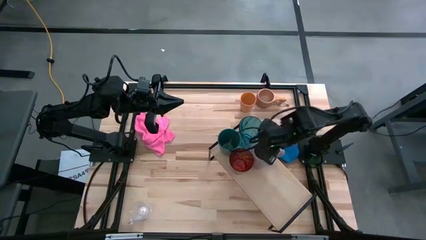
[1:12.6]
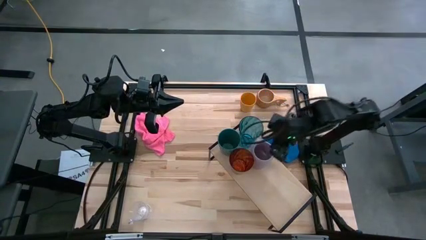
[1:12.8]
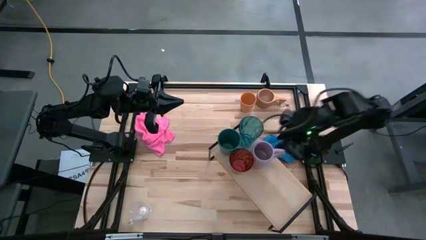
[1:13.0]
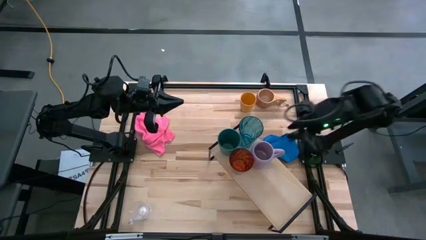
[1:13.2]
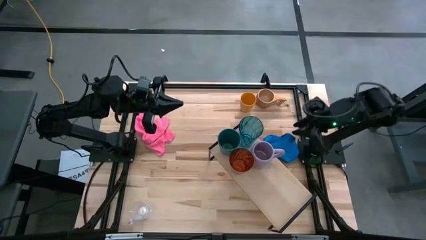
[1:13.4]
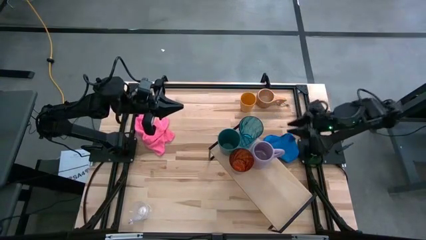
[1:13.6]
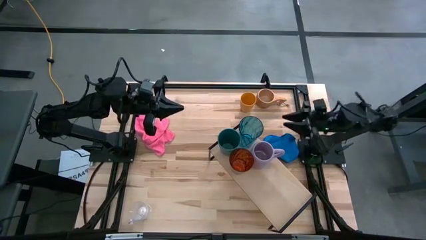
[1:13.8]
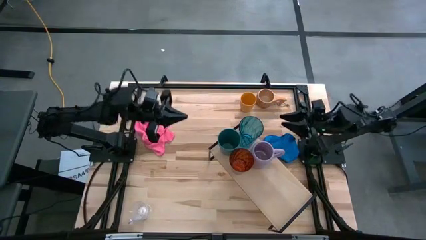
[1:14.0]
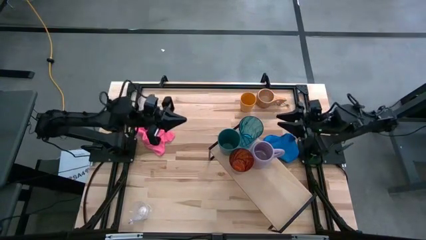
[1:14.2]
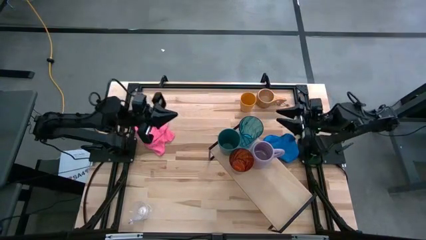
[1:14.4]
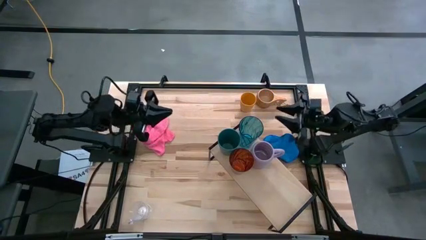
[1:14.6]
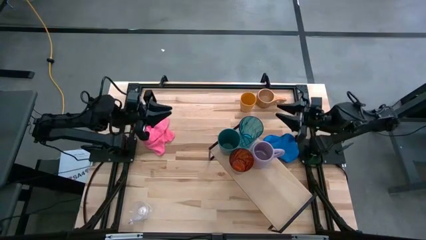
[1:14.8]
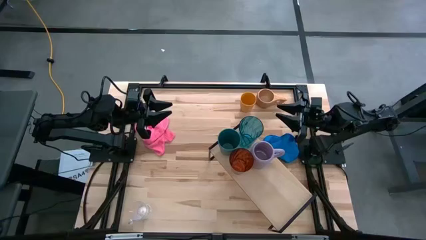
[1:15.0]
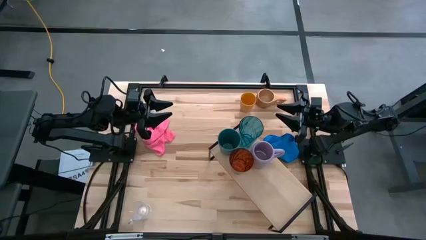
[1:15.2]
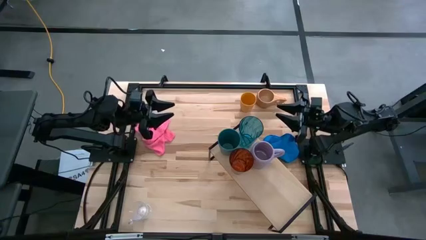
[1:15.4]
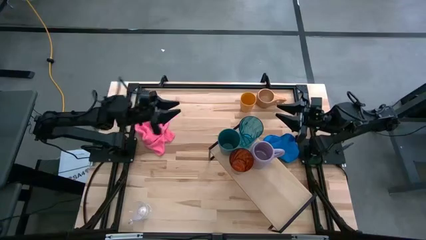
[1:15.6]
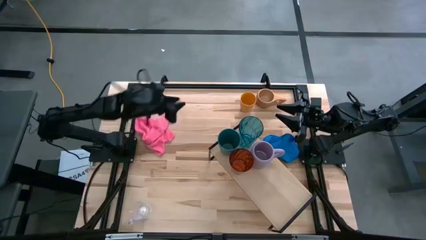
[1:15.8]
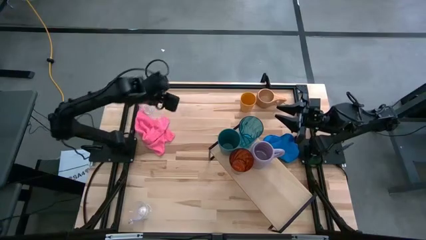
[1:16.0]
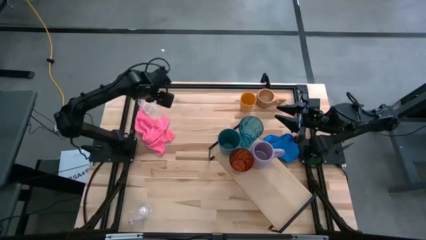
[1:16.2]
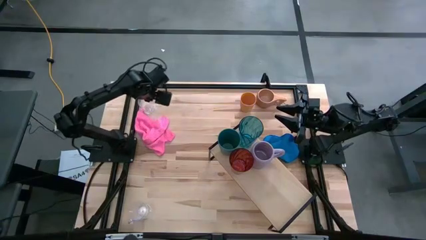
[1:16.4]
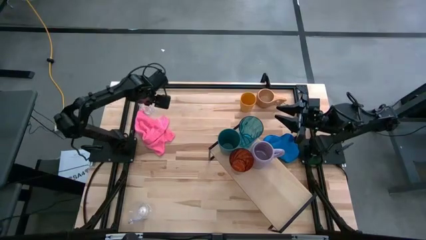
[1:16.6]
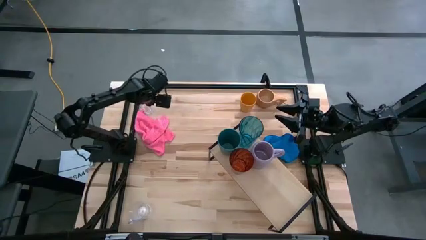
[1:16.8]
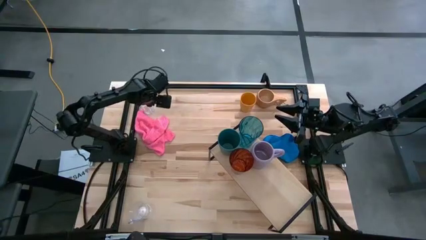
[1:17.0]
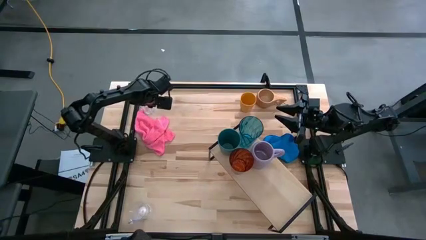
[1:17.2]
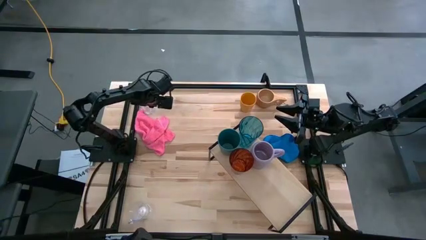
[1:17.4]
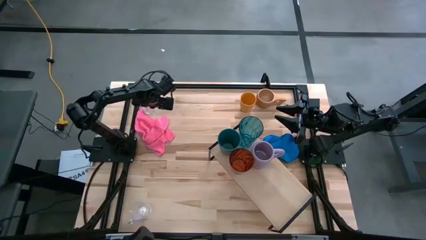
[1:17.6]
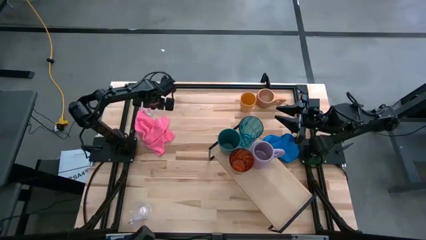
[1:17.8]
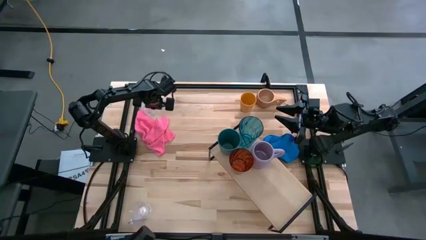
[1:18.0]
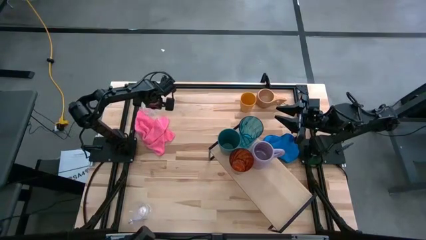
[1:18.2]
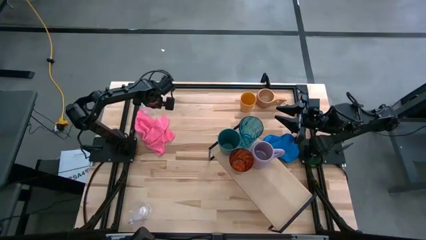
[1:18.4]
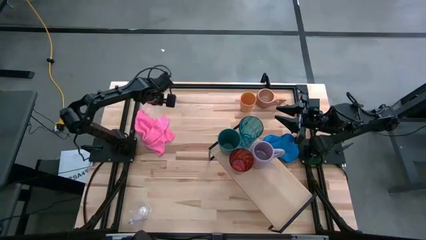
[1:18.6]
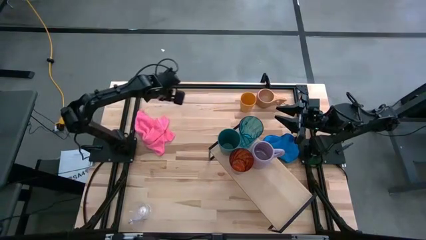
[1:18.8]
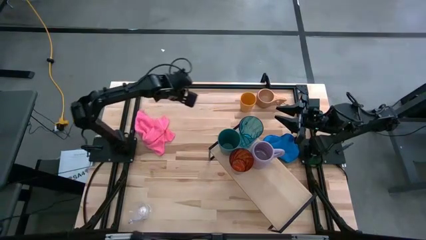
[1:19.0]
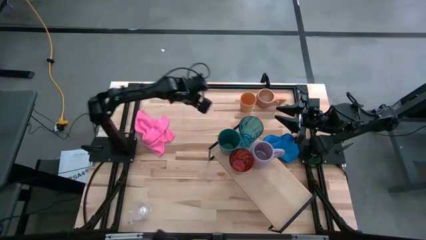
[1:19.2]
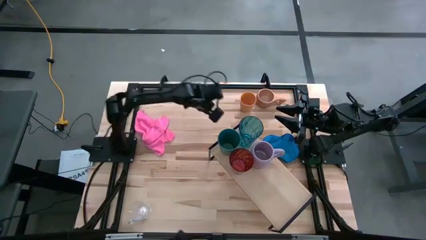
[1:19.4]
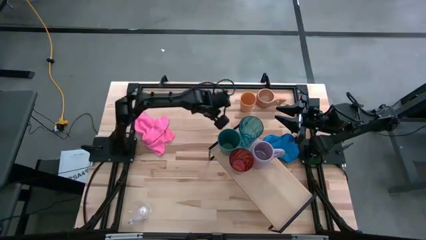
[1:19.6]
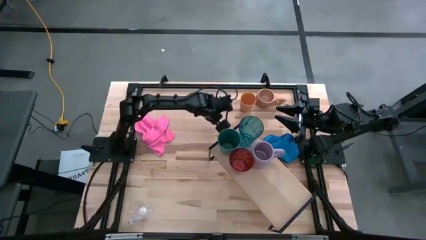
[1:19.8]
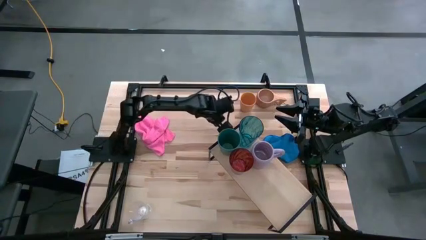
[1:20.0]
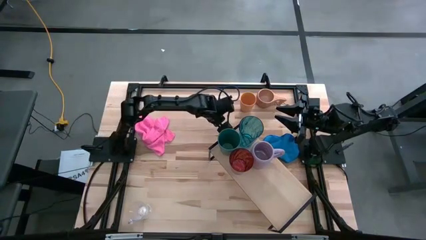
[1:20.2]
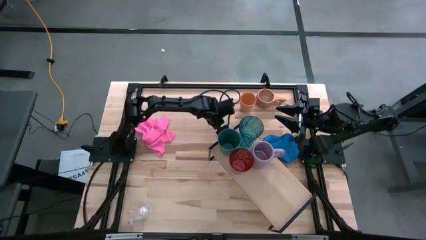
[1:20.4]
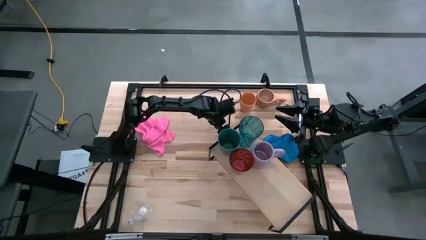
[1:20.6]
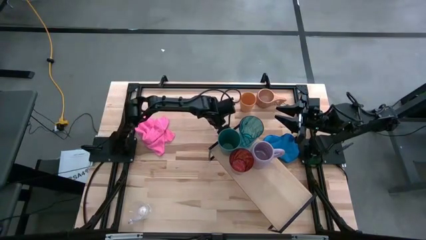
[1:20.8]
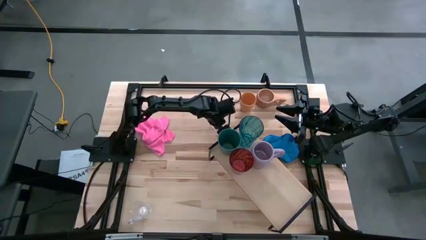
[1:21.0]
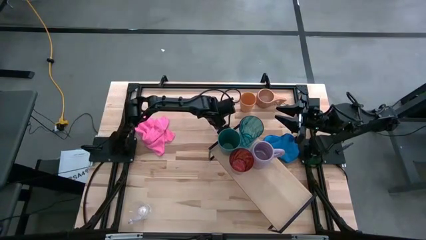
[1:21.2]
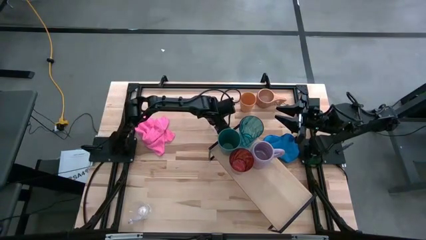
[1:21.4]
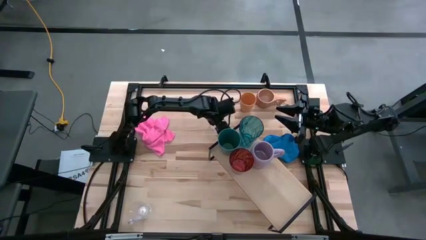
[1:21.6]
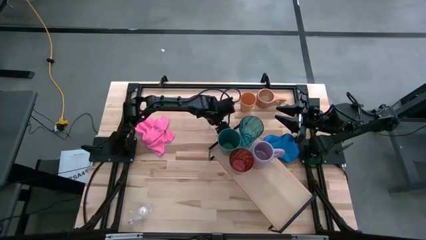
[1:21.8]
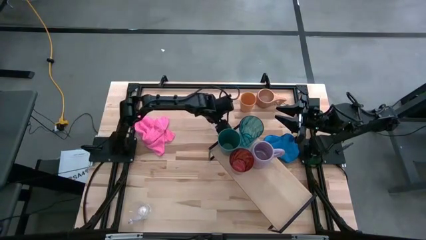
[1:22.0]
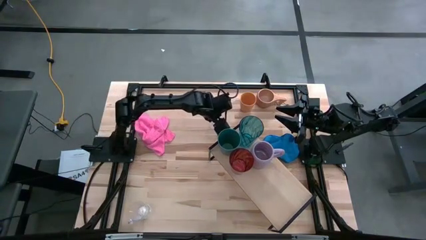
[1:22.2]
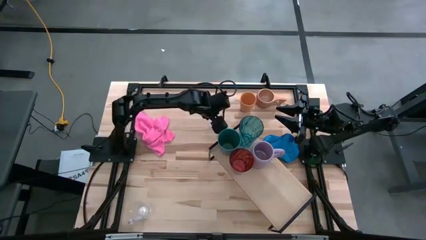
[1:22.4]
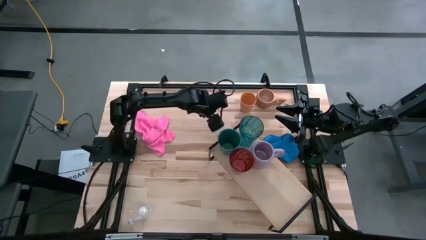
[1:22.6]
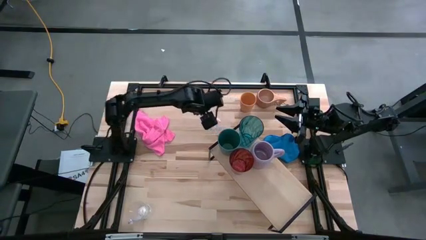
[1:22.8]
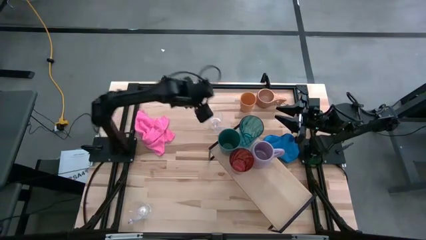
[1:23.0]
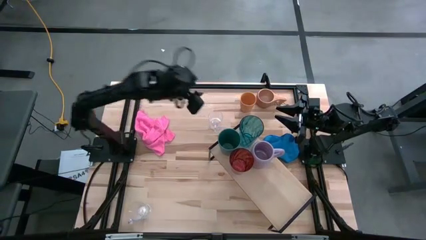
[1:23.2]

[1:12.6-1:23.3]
Task: Stack small to large cups/mugs on shelf
Put the top transparent mug on the shelf
